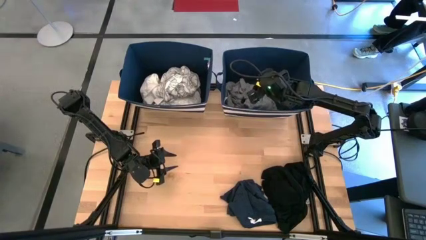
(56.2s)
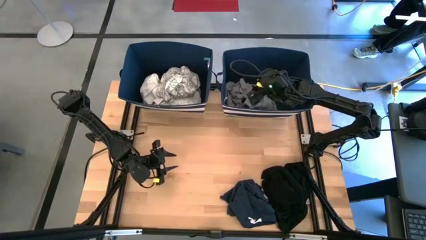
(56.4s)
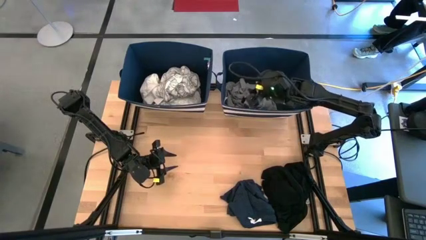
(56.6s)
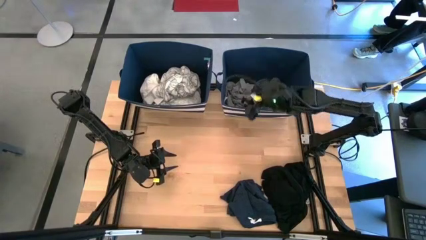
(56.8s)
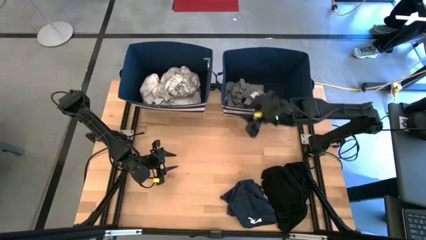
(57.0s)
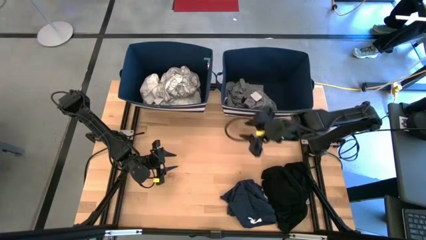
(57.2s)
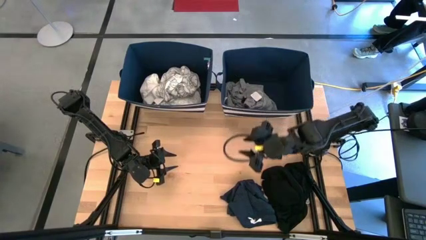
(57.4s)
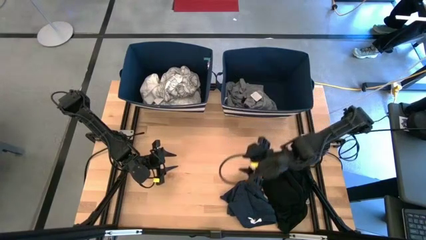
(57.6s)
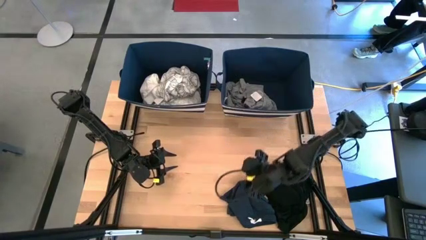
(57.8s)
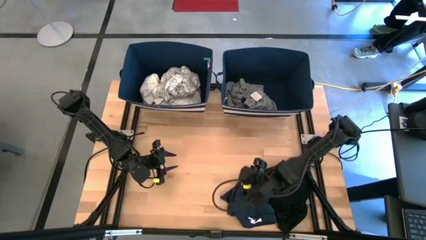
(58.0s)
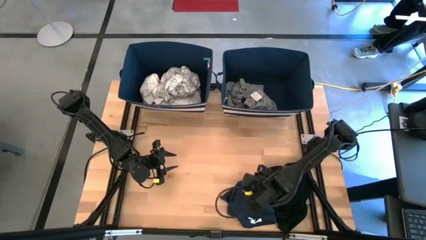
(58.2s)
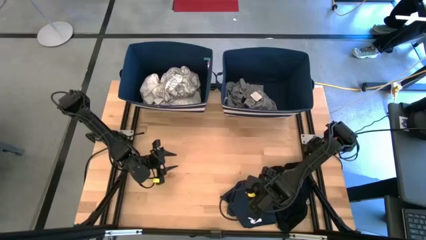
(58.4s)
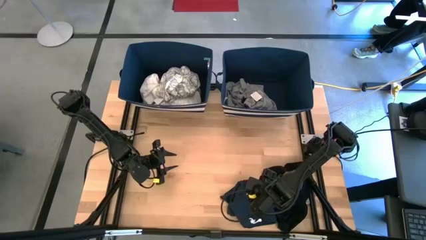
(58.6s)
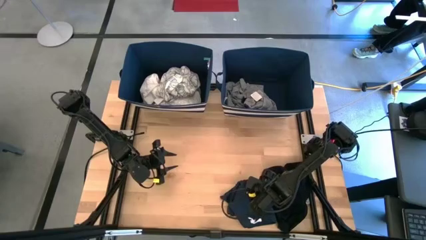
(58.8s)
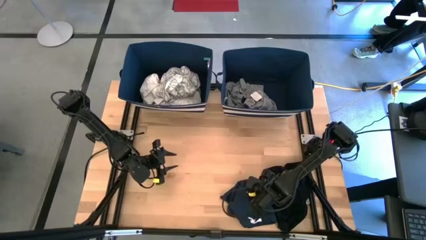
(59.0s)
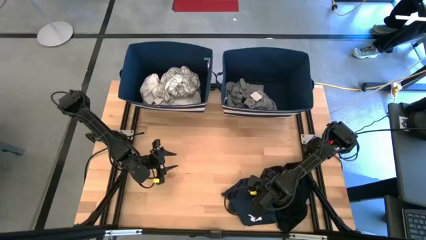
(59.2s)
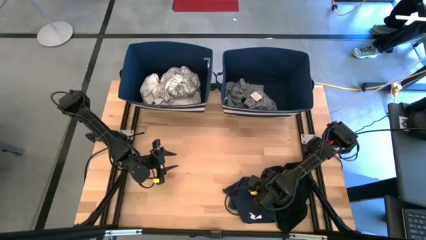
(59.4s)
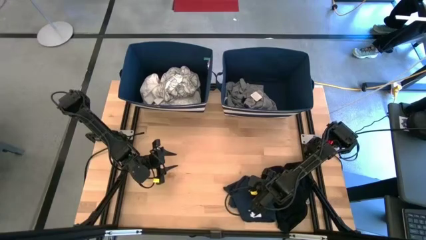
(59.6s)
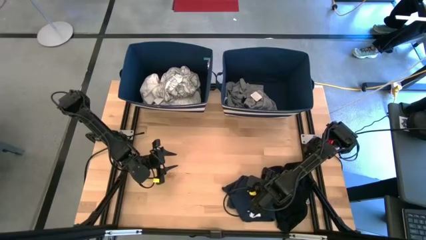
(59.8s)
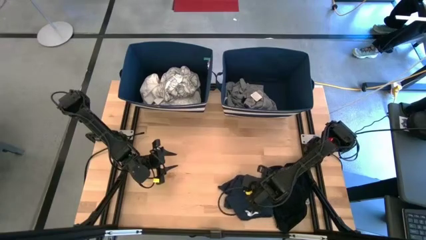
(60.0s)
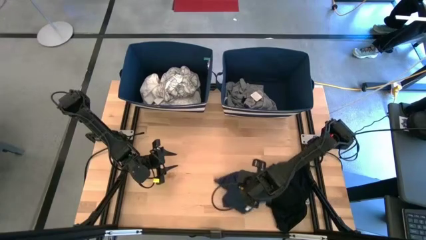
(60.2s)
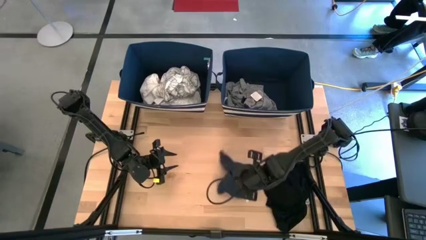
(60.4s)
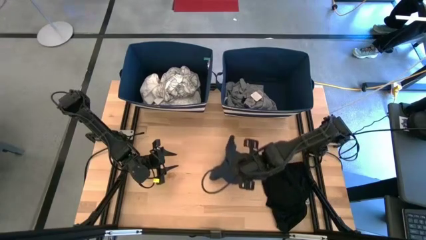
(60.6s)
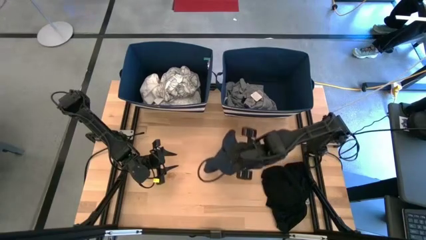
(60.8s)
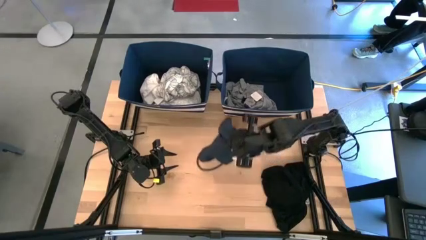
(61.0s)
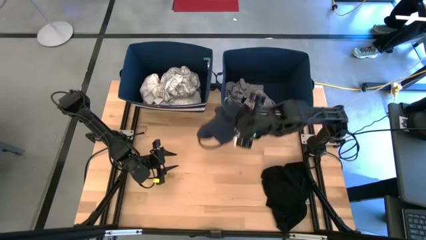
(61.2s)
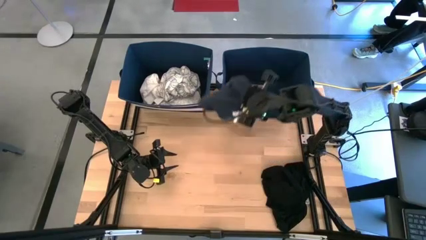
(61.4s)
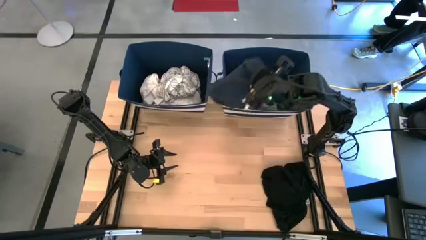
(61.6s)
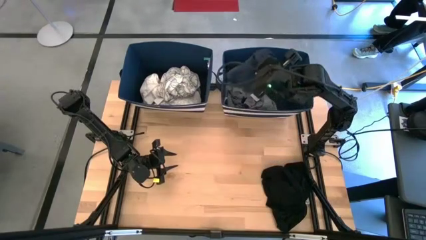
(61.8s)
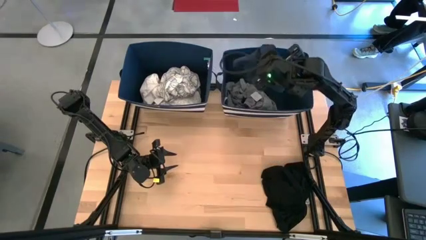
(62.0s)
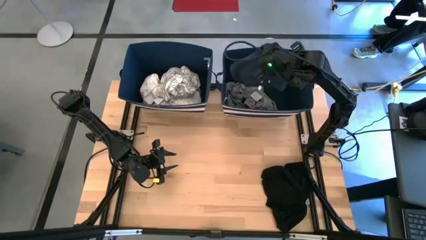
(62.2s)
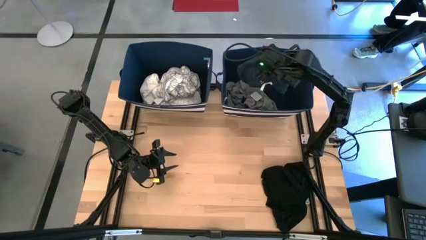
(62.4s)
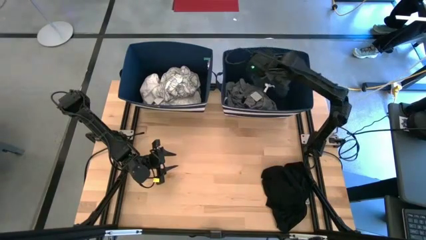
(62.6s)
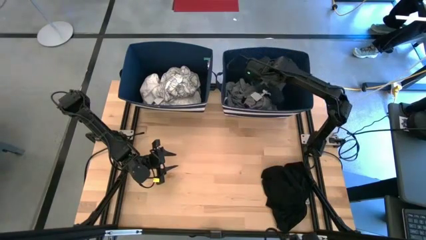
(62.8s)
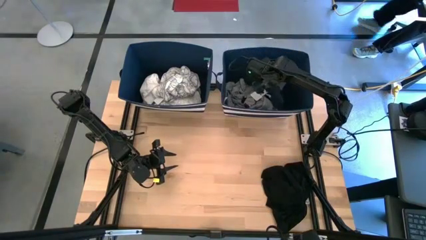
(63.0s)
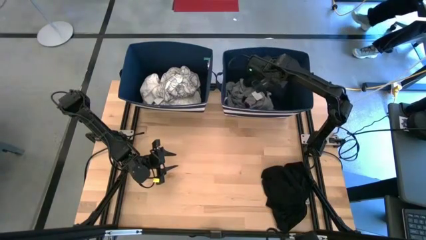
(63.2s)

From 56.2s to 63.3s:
Task: Sort clothes
Put the dark grey shorts into the left laundry organizer

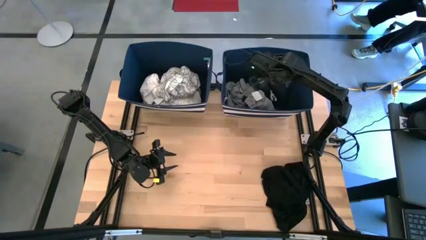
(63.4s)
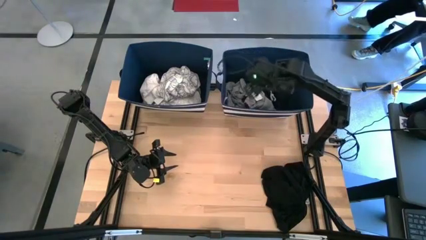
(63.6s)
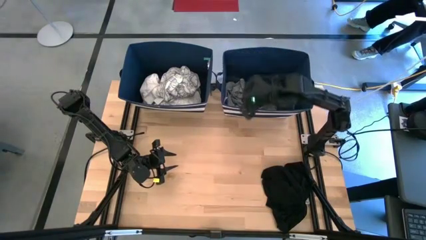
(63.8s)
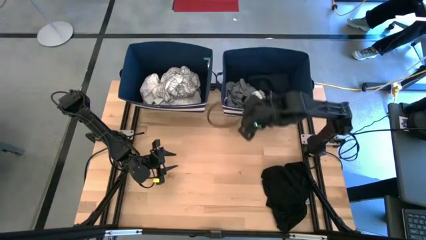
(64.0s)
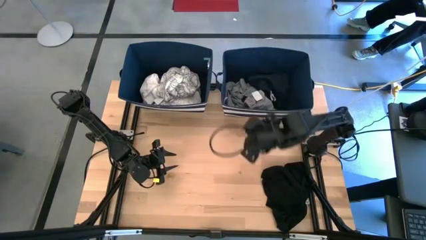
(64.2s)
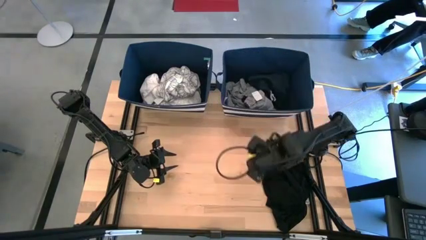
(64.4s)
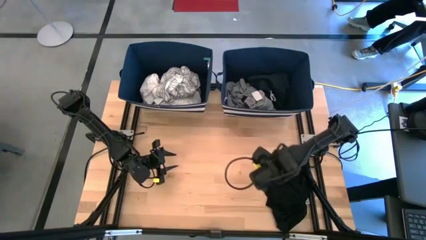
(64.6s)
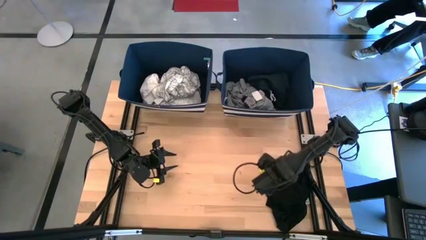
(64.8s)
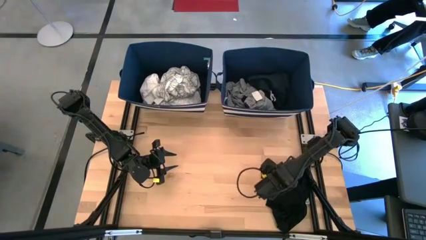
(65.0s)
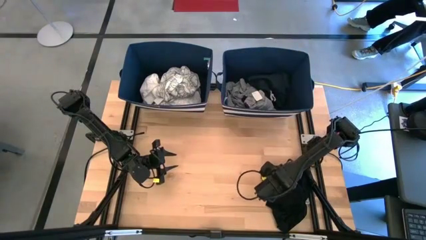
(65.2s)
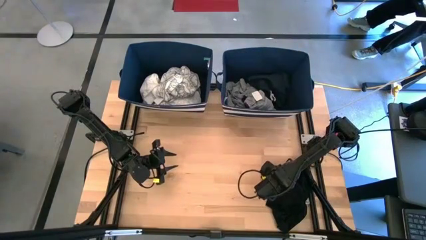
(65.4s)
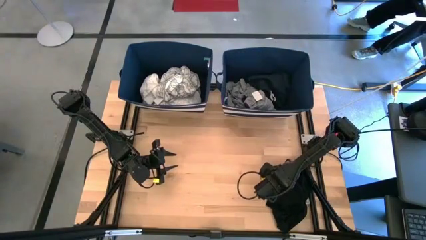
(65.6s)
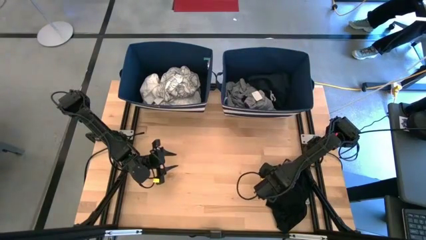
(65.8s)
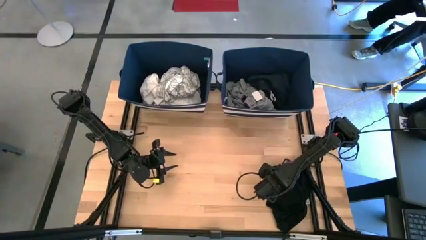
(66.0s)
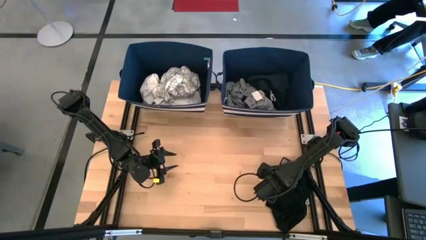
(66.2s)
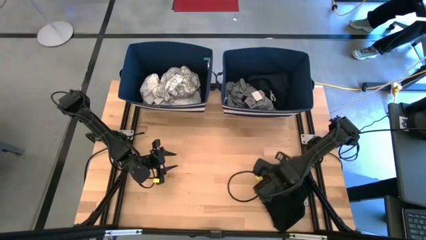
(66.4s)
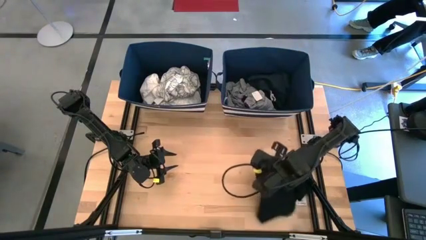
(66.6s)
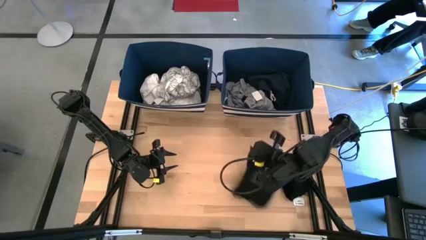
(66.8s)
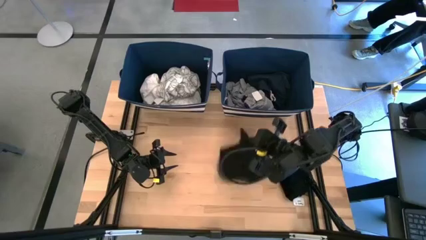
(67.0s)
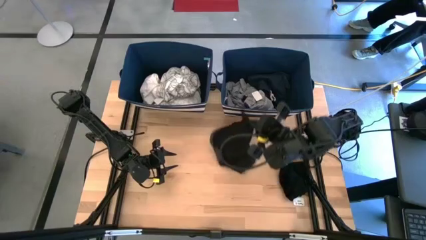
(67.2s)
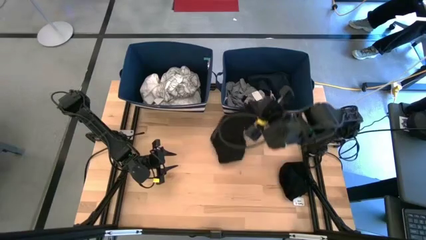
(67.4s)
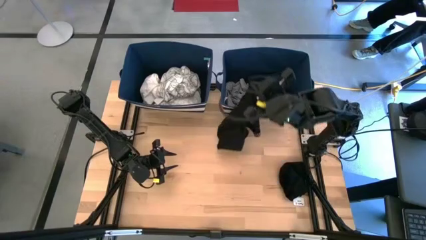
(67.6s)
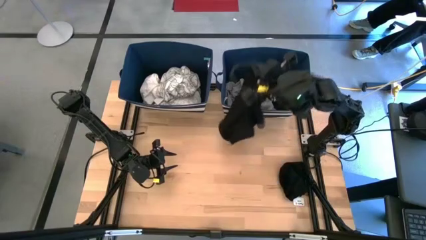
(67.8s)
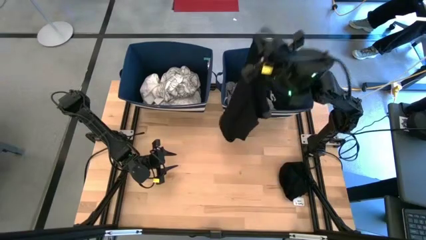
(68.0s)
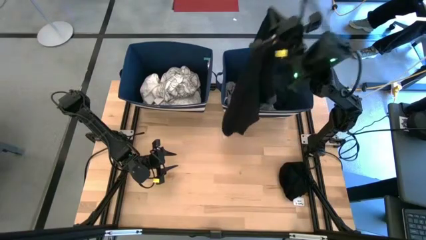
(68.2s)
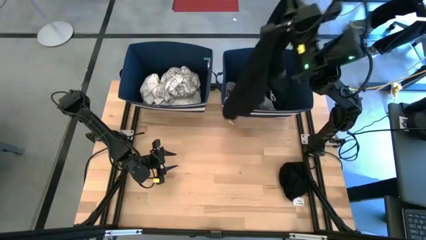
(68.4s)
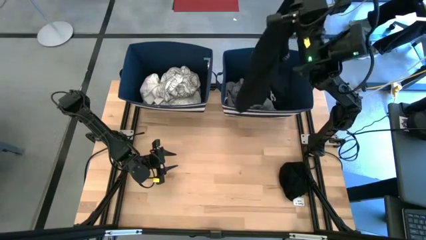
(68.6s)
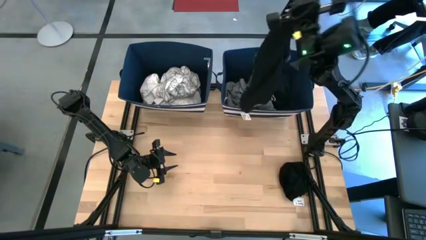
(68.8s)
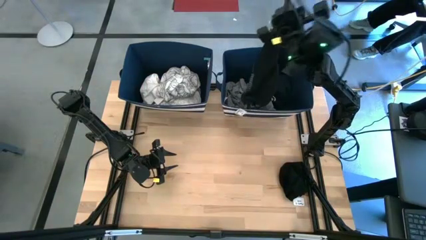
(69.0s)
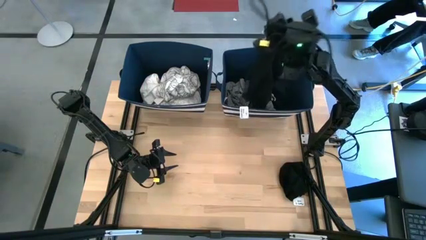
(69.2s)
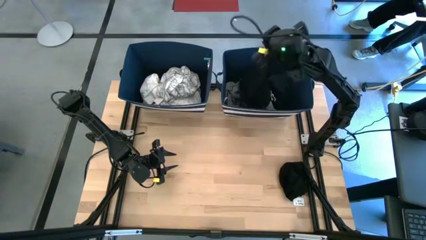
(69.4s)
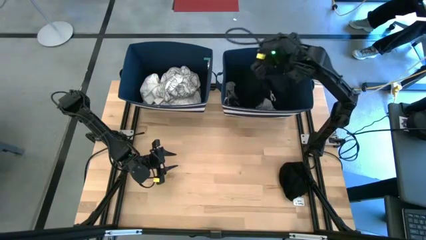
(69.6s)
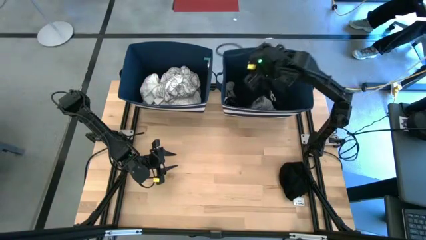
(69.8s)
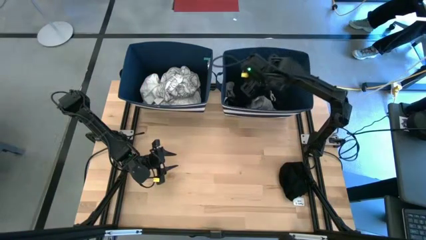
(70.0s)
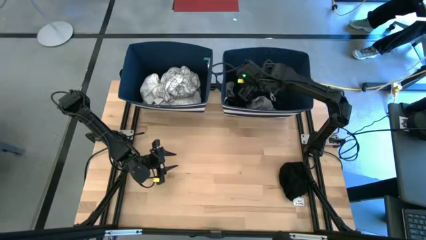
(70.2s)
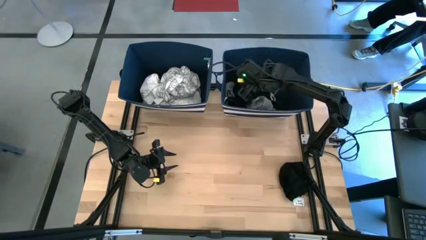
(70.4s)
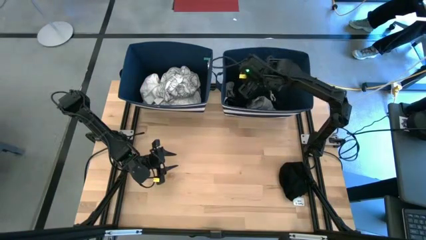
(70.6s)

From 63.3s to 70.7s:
Put the black shirt into the left laundry organizer

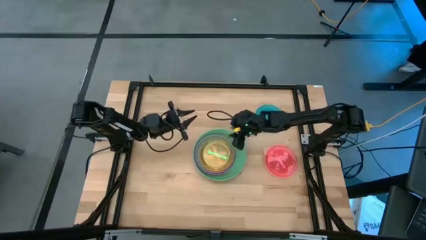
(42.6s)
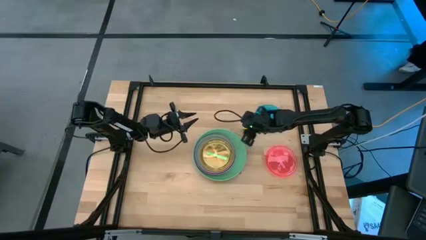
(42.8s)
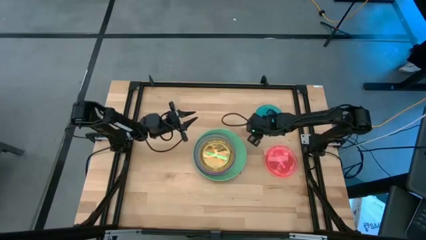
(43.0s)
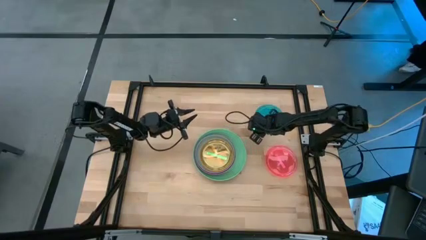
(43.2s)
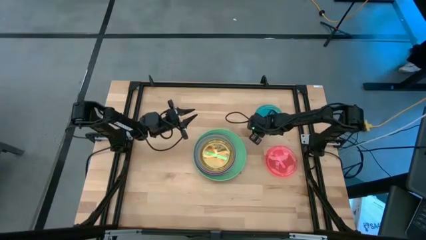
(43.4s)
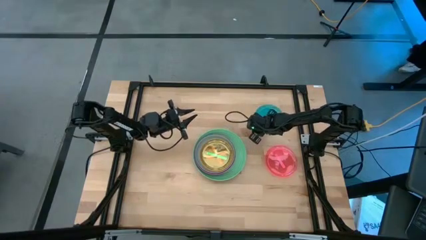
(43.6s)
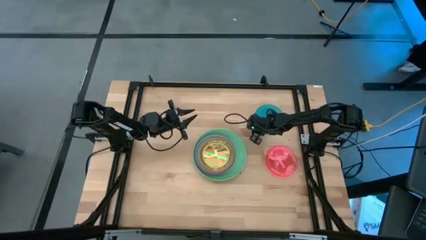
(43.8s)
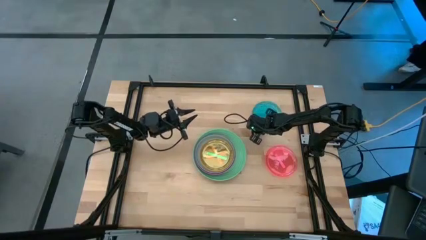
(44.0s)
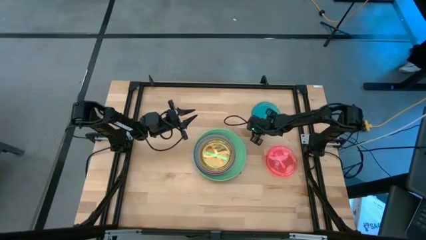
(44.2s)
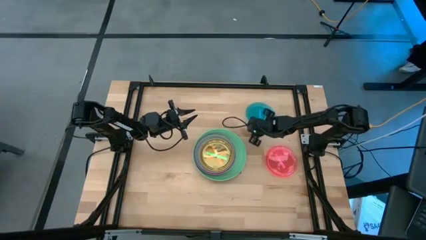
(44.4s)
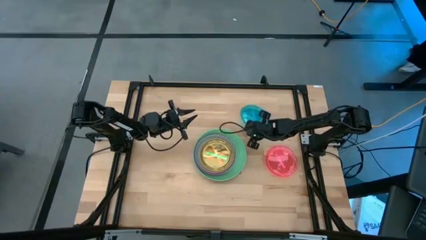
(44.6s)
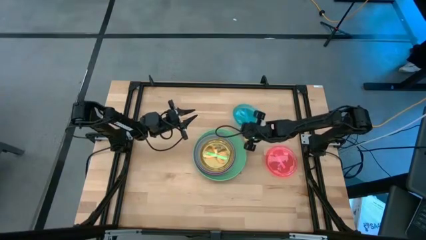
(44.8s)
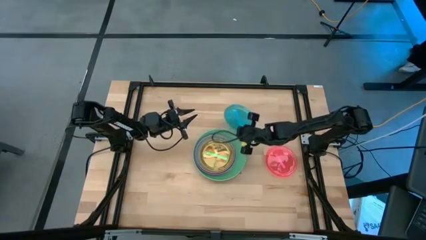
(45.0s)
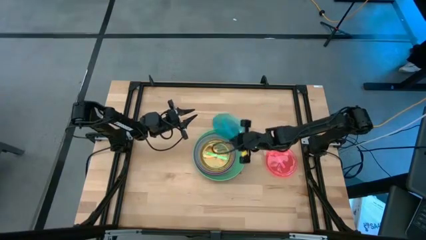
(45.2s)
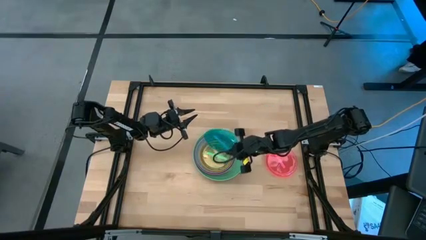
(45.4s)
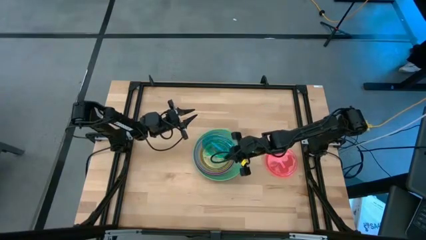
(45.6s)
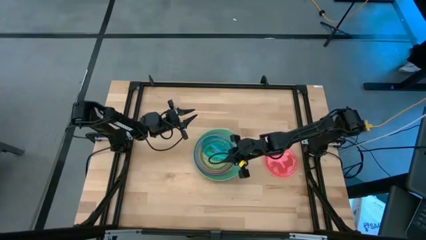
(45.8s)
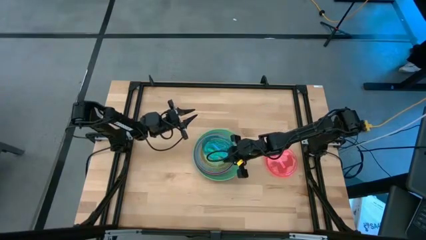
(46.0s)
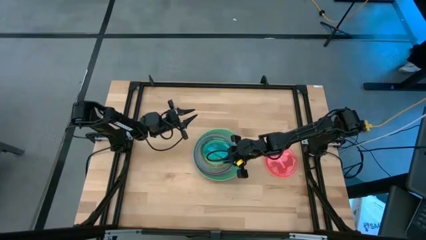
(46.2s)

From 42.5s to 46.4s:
Task: Stack plastic plates
Stack the blue plate on top of the light green plate
